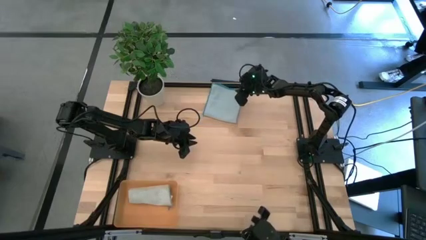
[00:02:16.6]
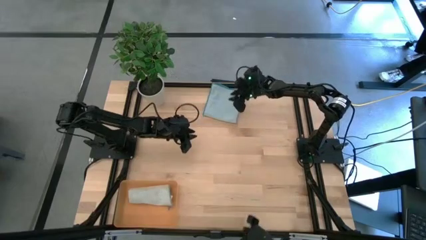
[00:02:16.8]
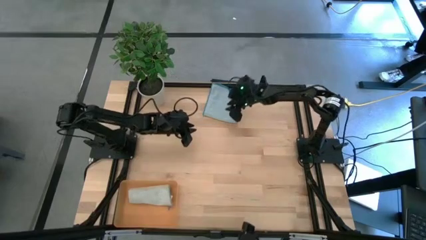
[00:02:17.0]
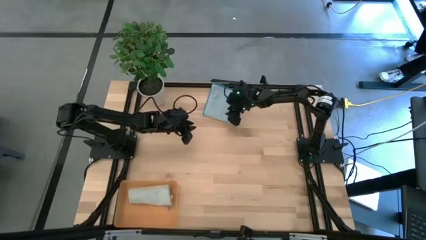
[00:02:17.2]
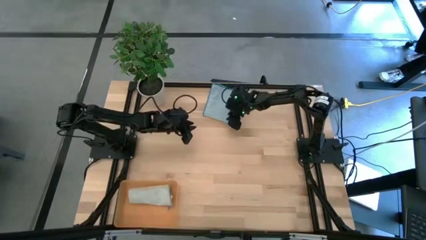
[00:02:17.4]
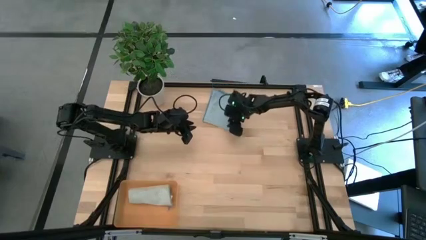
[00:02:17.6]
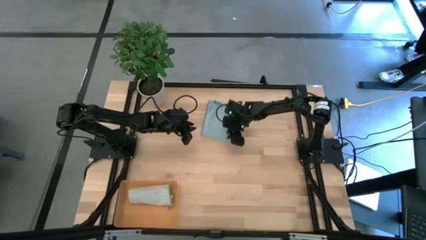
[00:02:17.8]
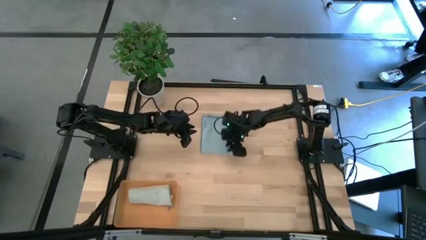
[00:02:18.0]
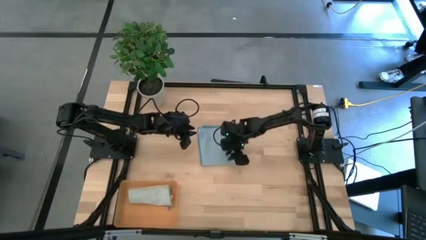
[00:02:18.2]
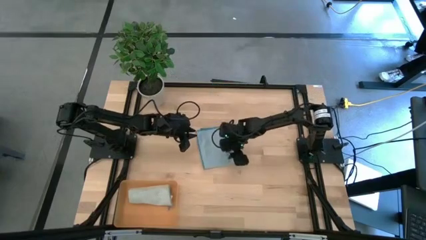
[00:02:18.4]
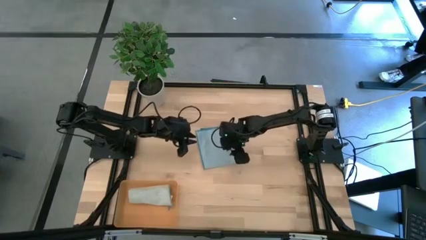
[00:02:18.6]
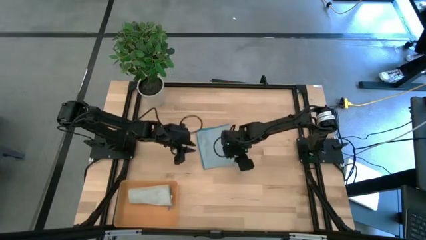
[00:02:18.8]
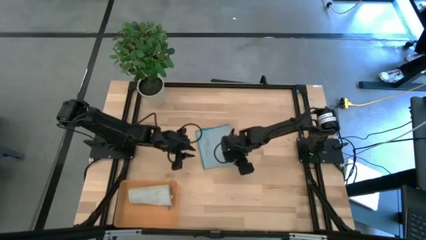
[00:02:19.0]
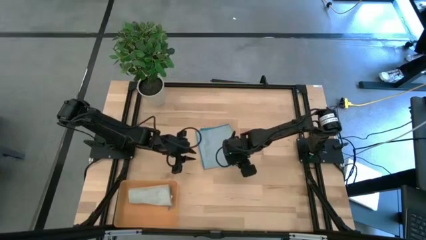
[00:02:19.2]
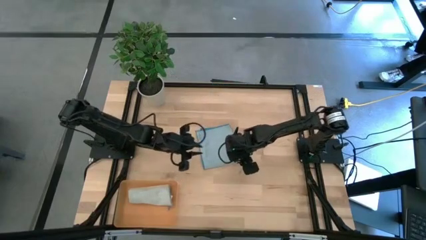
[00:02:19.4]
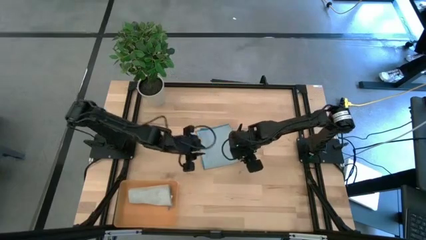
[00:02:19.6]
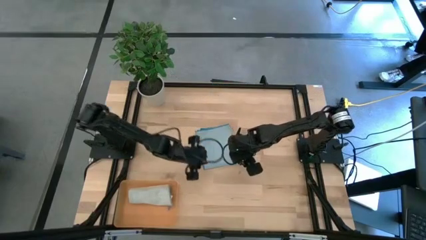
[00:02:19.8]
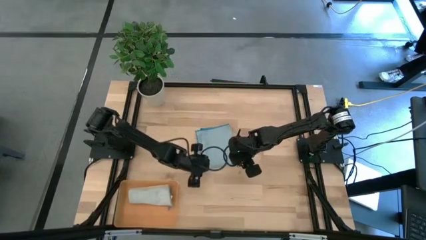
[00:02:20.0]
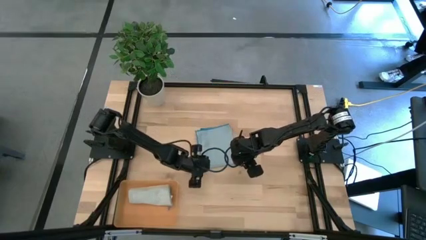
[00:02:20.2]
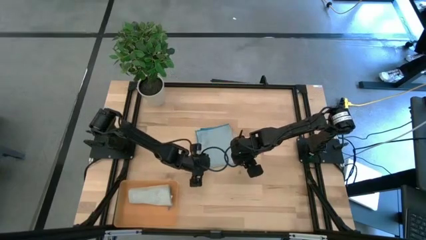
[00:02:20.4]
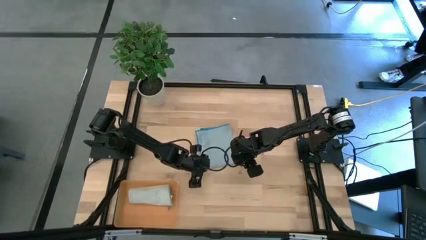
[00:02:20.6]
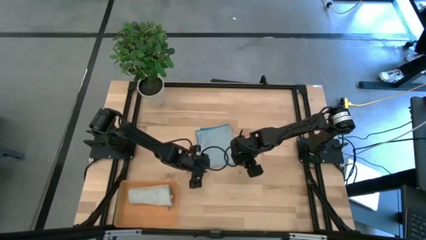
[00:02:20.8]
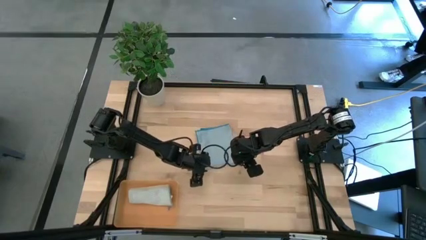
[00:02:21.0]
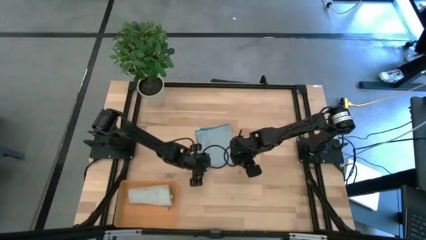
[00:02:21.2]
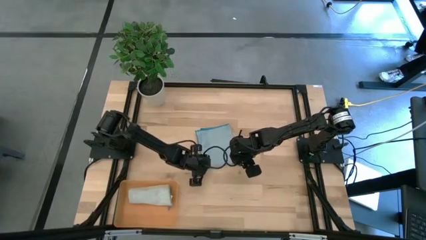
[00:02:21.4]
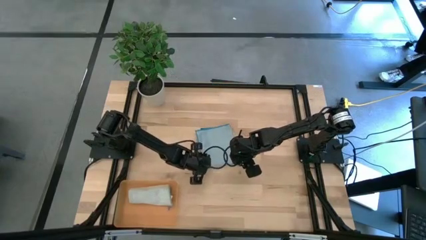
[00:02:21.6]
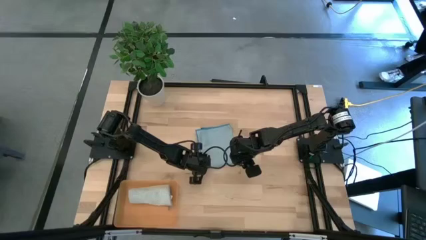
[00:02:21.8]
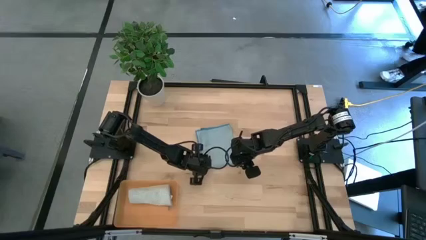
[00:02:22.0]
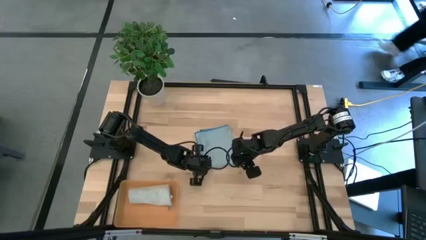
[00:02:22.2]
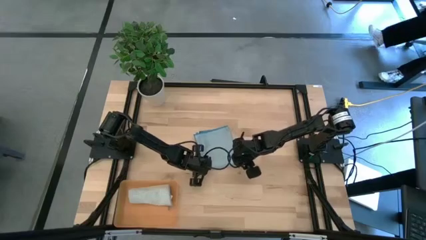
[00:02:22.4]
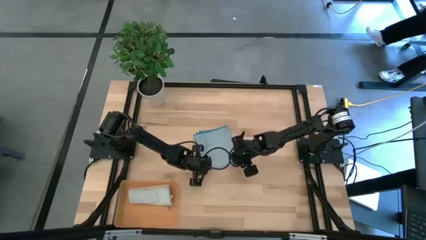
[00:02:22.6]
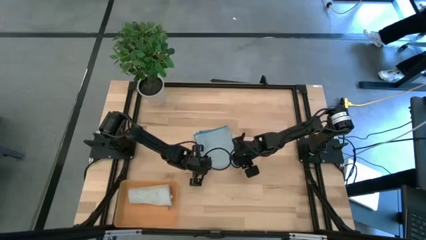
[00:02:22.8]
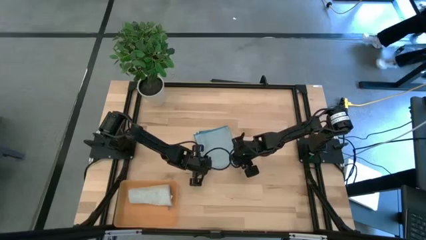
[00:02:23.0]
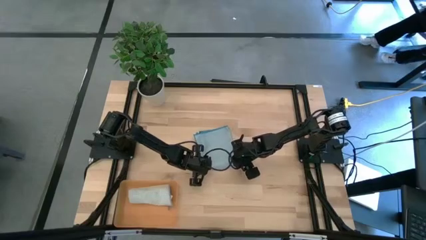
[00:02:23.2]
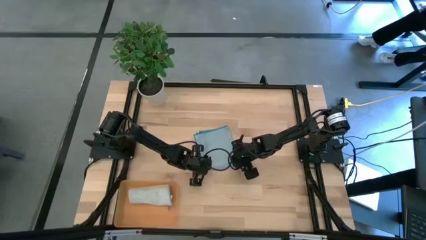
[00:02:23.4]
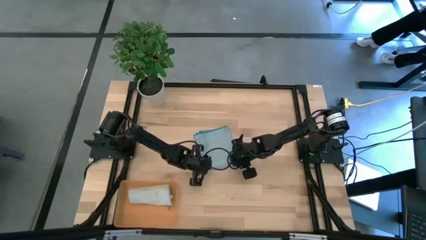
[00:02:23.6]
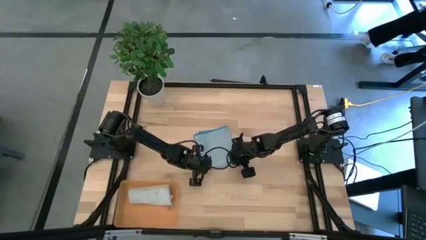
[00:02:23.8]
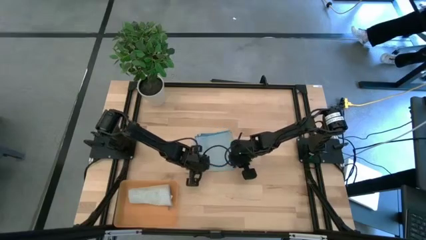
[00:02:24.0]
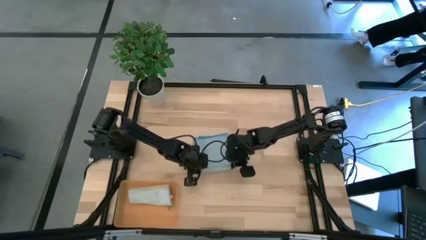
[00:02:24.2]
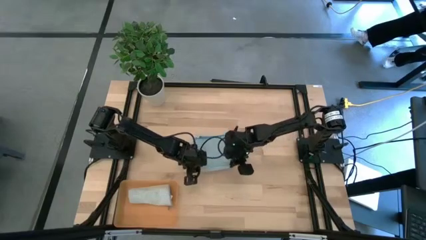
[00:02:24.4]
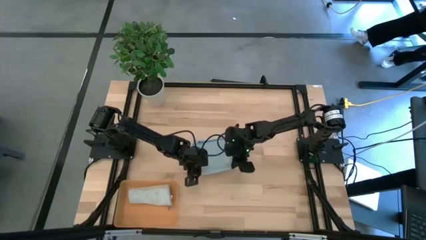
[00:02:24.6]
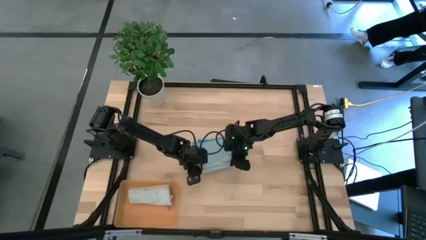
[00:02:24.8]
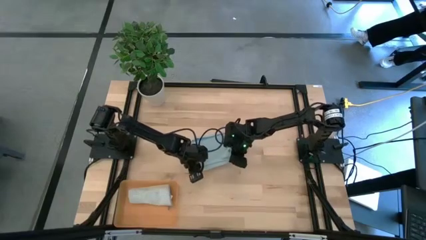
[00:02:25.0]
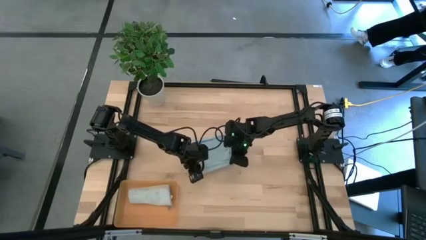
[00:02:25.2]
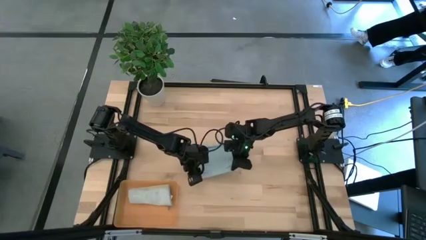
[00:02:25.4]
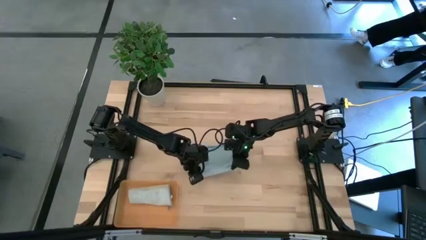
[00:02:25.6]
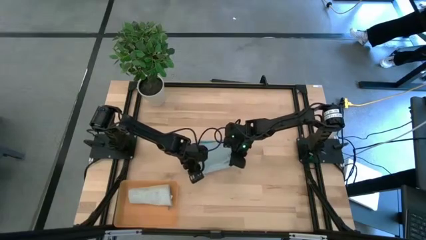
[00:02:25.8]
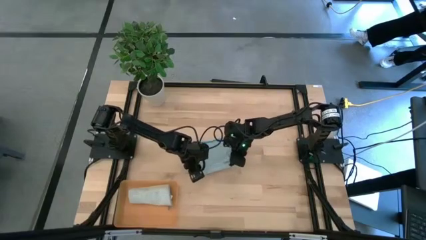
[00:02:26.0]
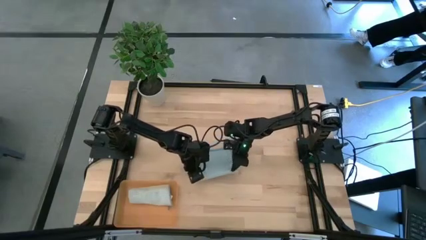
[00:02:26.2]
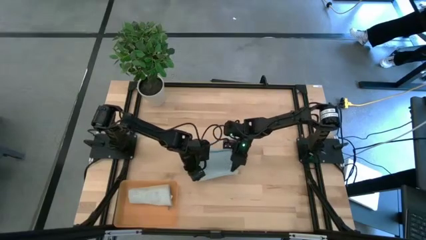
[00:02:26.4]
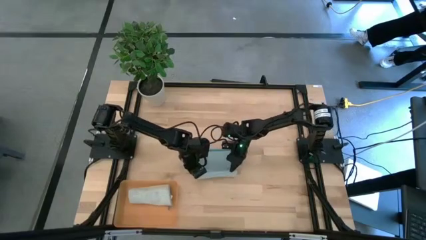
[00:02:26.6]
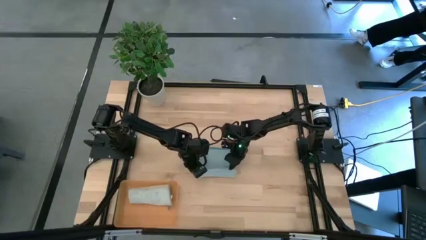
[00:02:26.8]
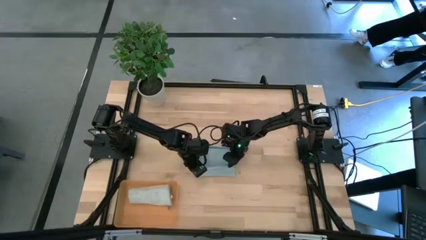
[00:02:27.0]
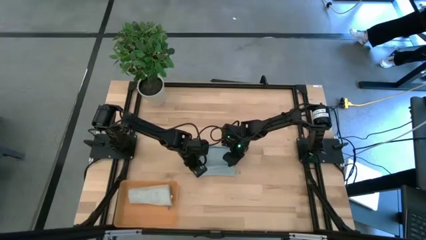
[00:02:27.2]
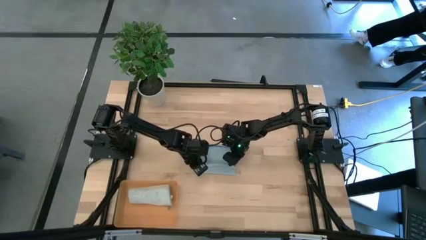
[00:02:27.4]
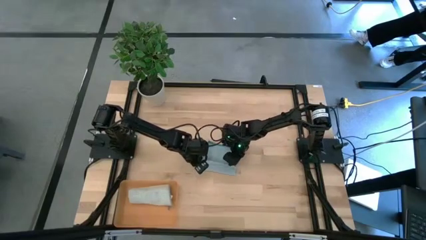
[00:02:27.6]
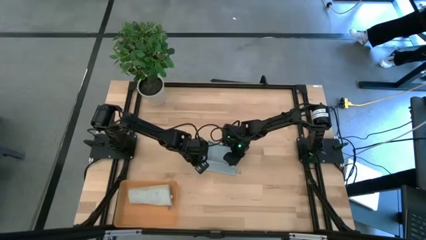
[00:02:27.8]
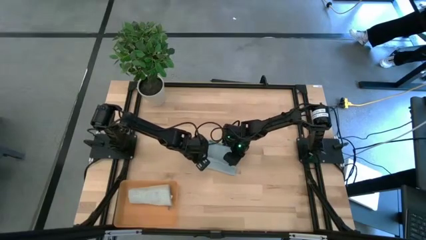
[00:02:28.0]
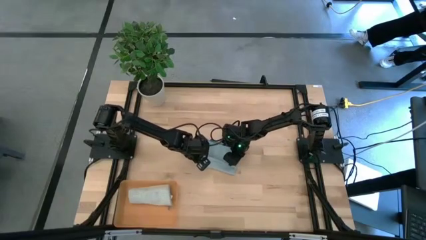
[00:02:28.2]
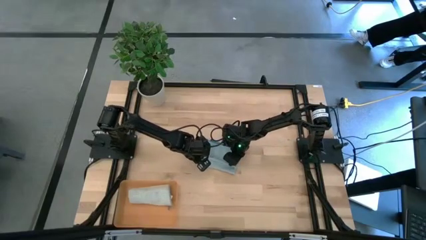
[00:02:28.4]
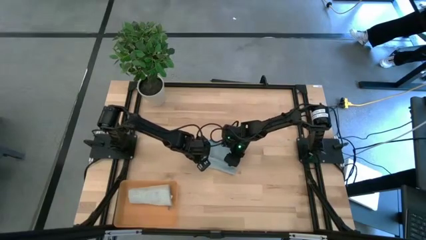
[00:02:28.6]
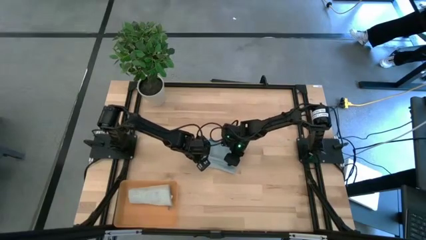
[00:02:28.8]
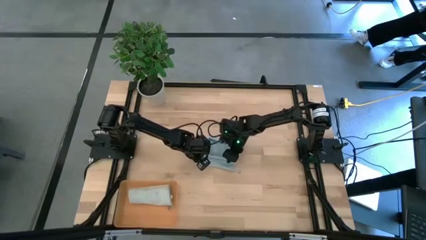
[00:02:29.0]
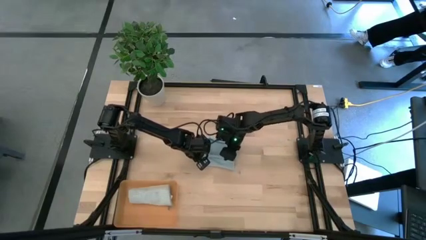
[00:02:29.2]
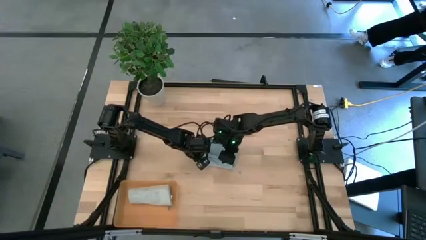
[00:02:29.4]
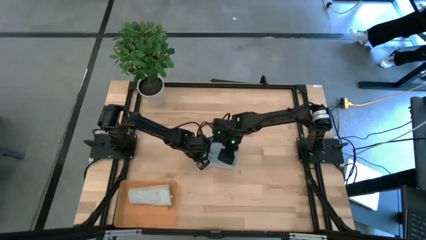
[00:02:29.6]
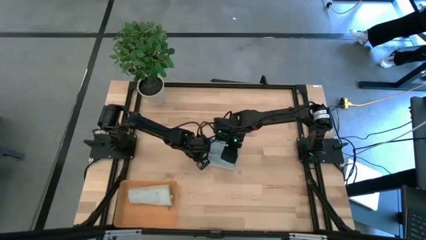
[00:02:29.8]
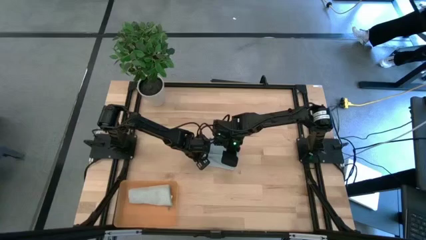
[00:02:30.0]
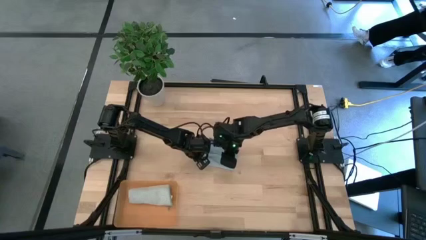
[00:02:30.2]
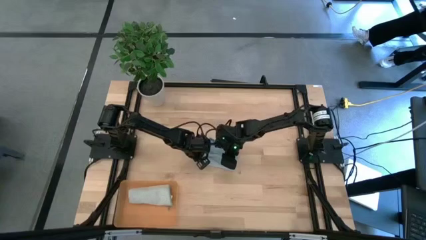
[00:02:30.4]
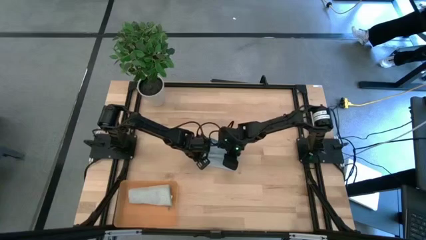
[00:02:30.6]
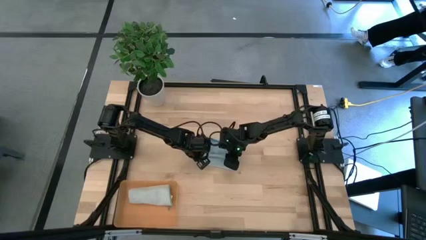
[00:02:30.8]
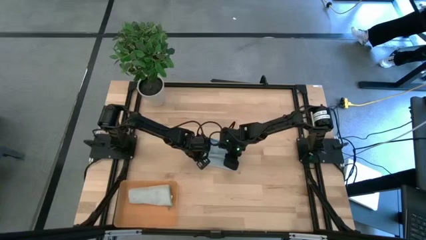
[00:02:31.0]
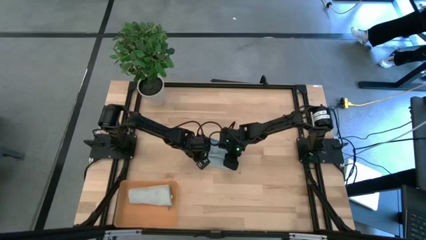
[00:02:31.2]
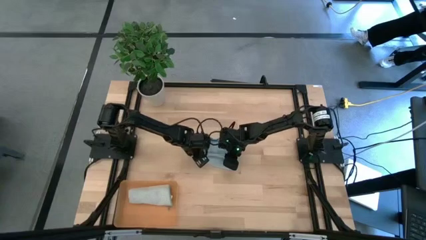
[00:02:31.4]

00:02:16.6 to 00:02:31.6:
Task: Roll microfiber towels into tight, uniform cylinder then place into a basket
Roll the blue microfiber towel
